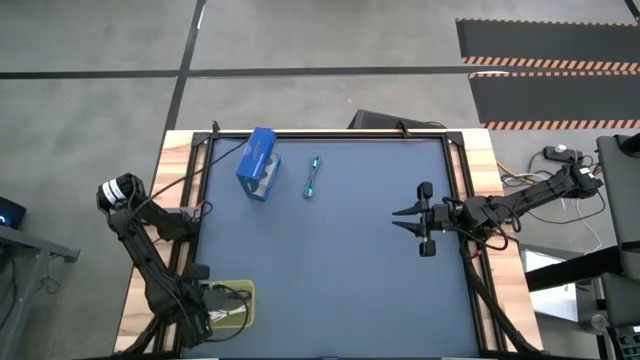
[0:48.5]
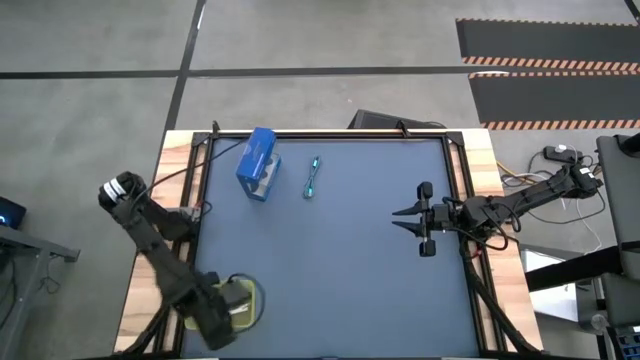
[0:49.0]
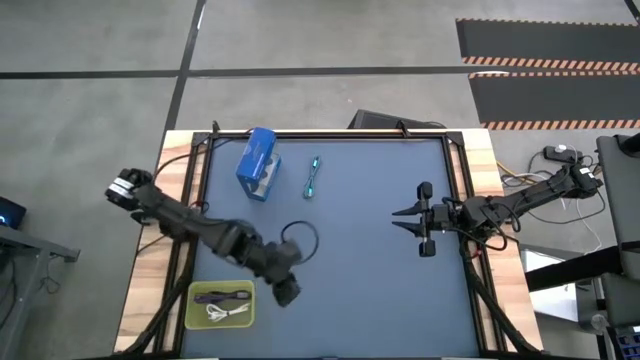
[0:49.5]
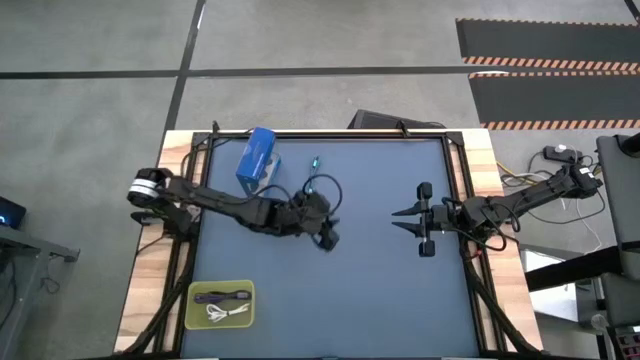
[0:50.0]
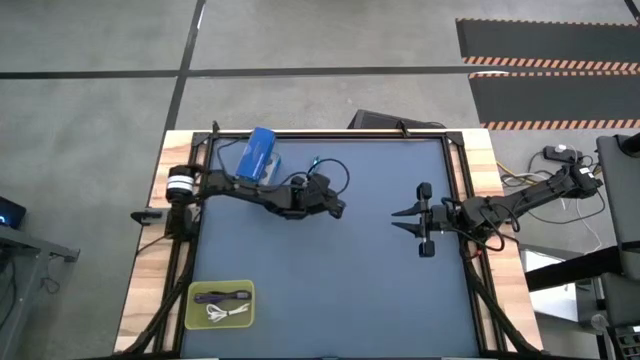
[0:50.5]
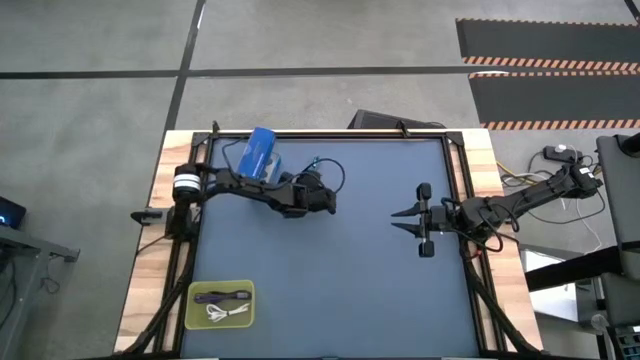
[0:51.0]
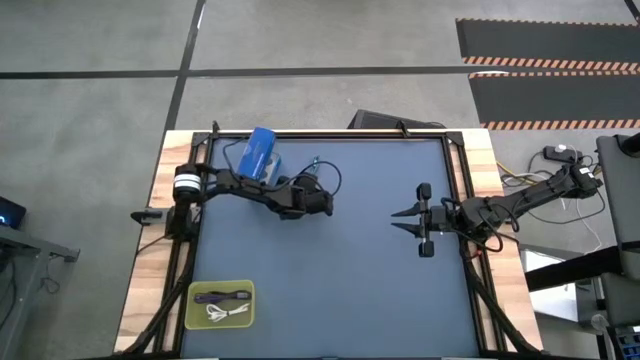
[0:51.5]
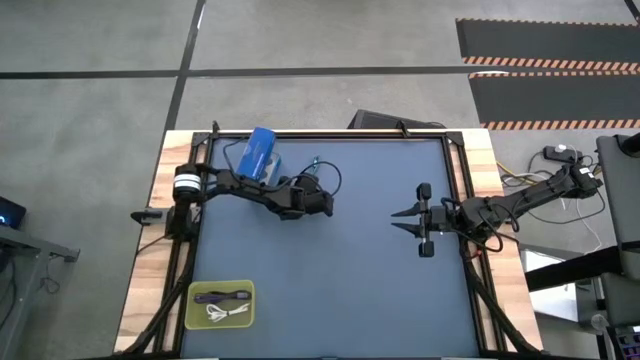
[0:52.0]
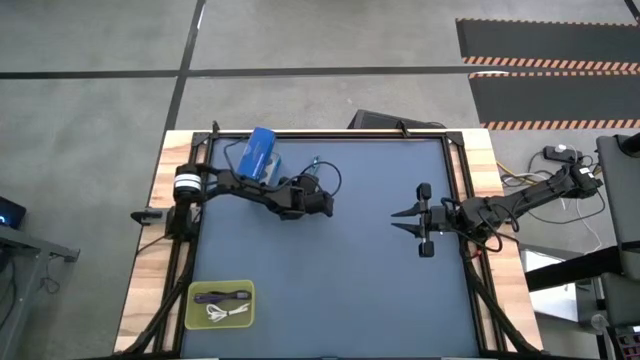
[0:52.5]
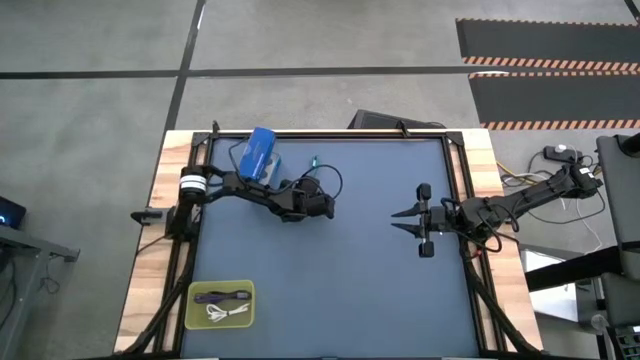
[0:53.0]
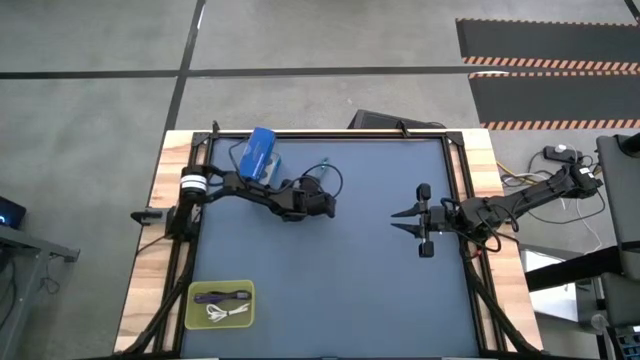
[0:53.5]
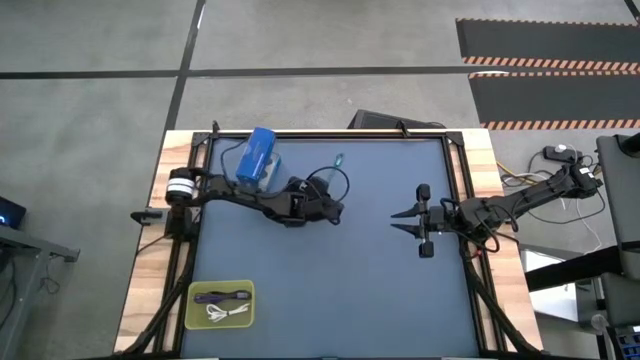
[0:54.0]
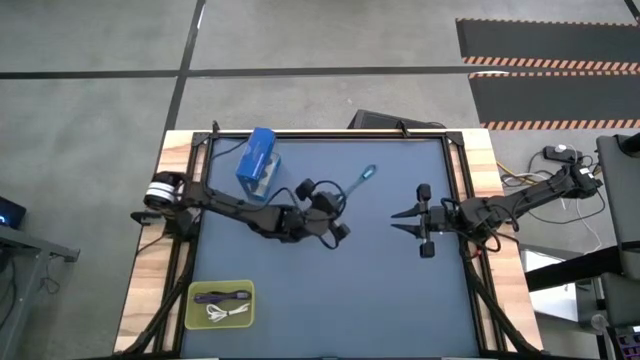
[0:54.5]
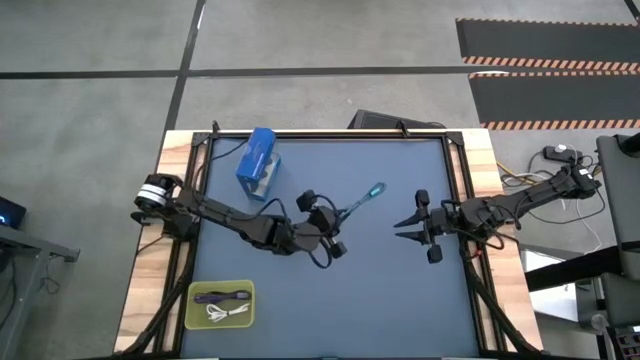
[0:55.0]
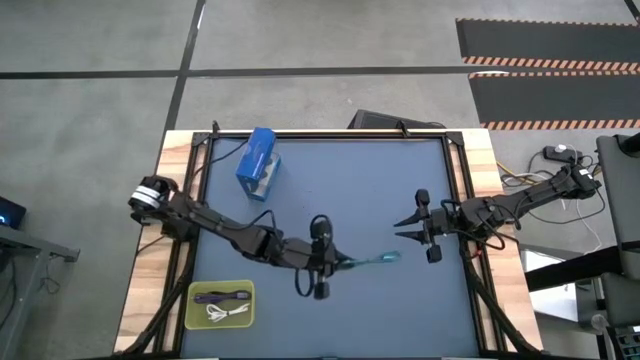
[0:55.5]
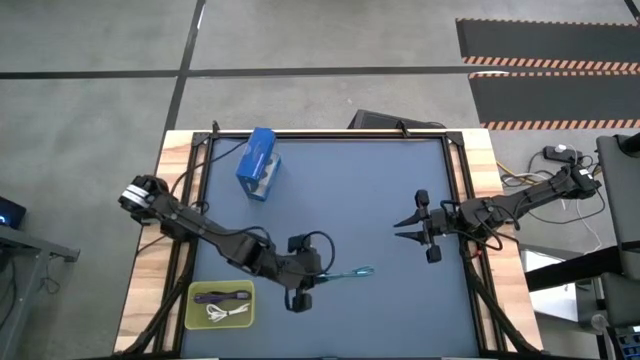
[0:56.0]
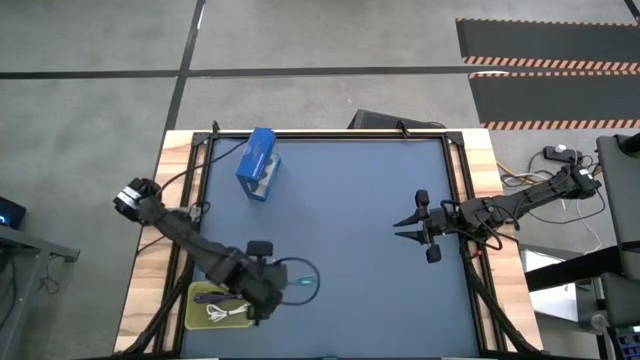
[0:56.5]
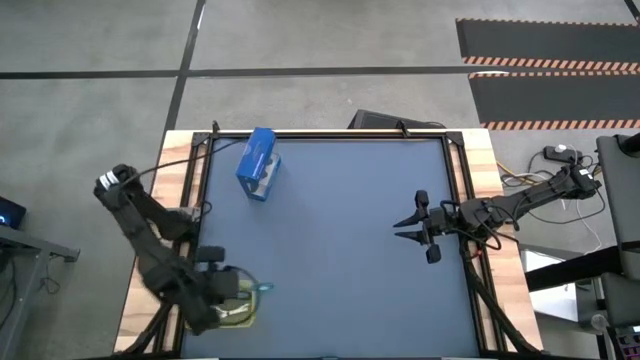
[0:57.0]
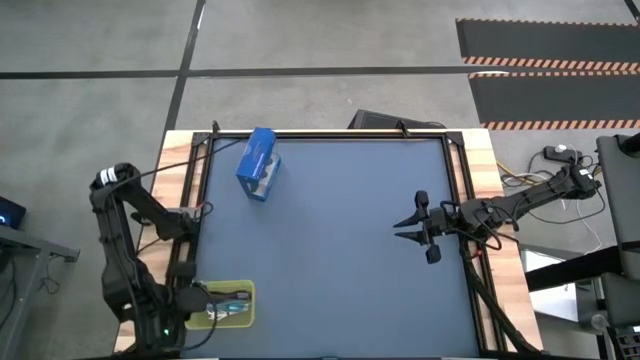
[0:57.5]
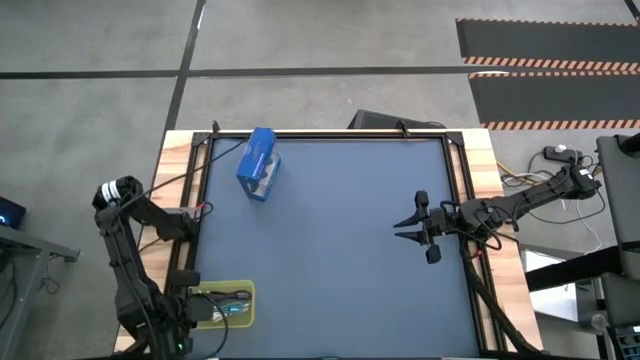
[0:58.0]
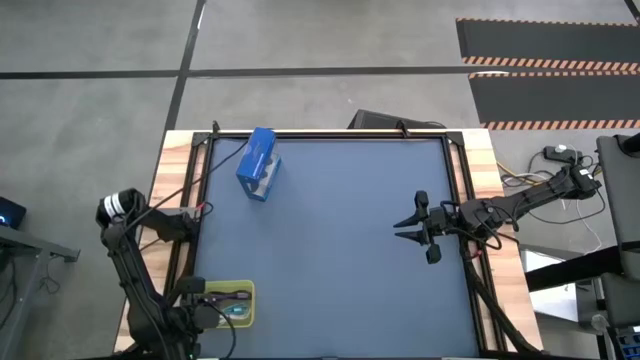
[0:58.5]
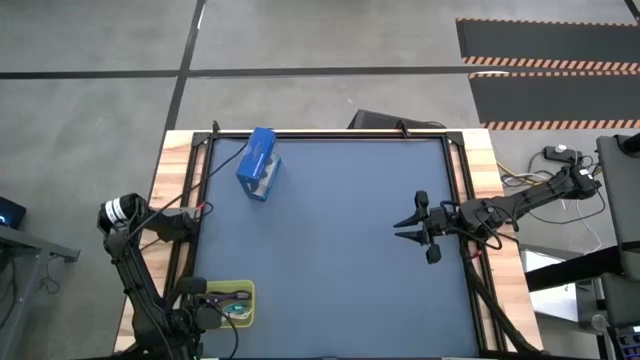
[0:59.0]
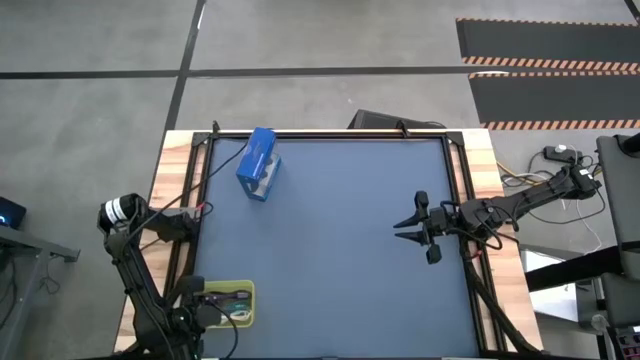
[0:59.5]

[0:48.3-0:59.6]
Task: Pick and place USB-C Cables
Put the green white charger cable into the yellow bin

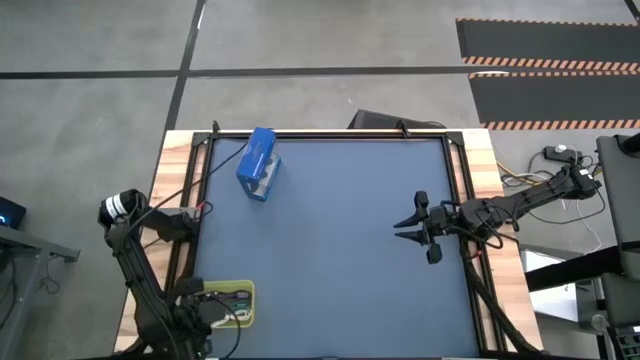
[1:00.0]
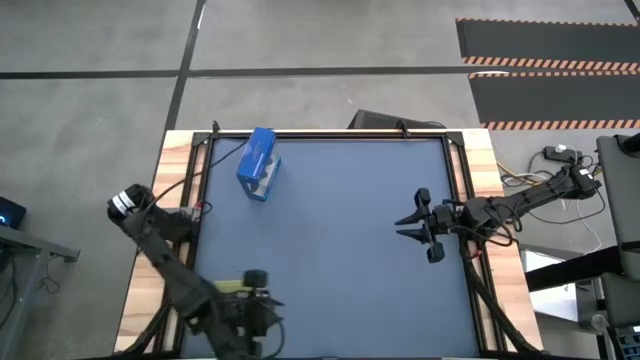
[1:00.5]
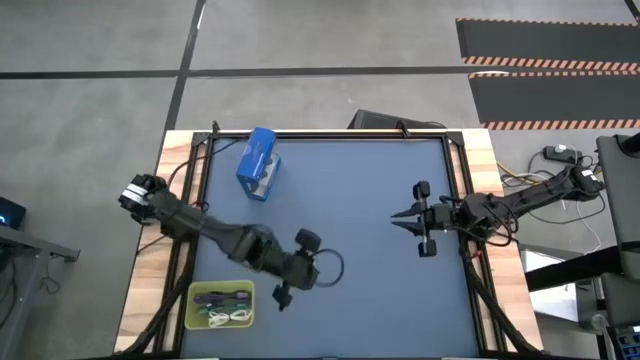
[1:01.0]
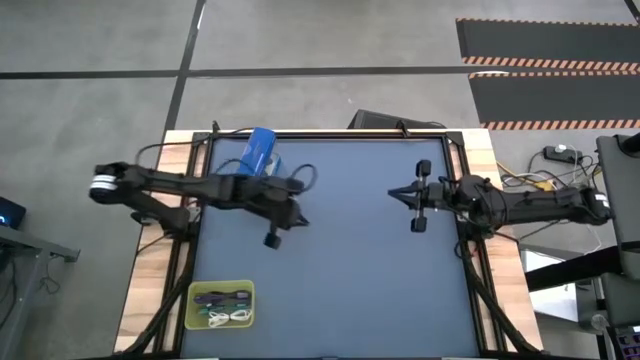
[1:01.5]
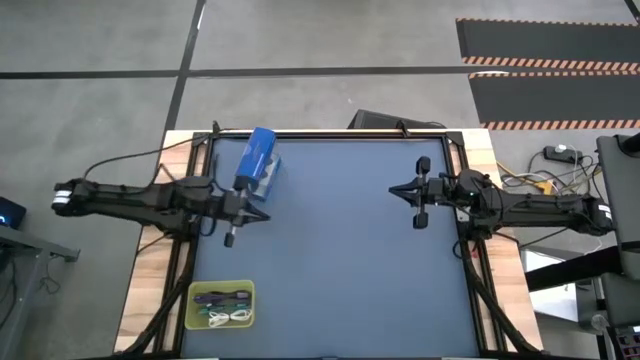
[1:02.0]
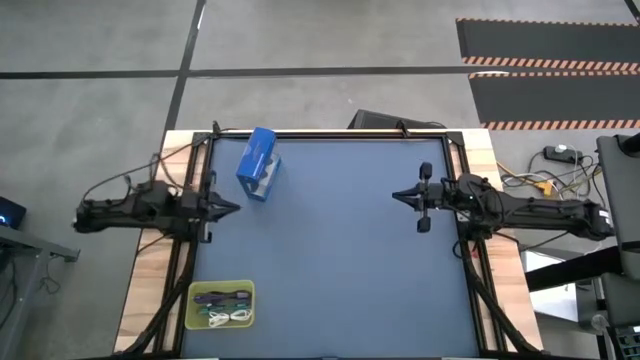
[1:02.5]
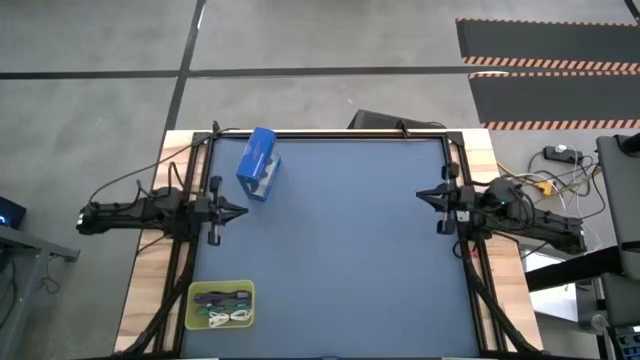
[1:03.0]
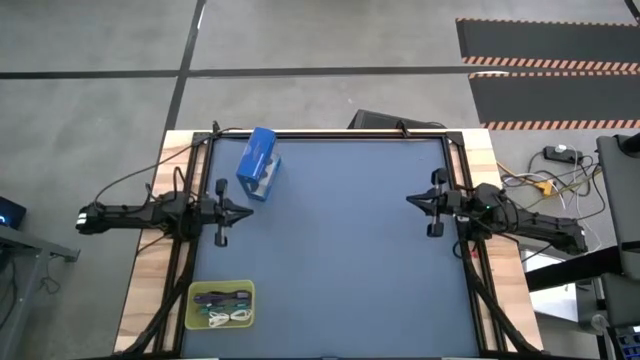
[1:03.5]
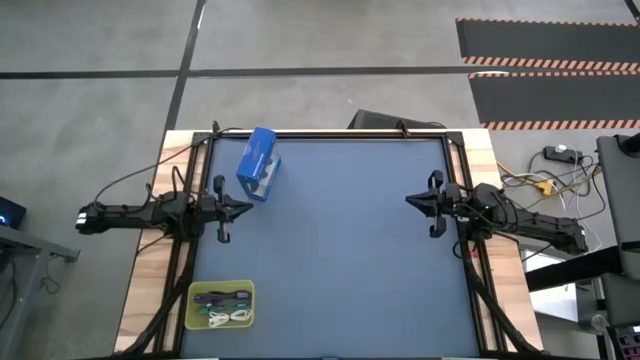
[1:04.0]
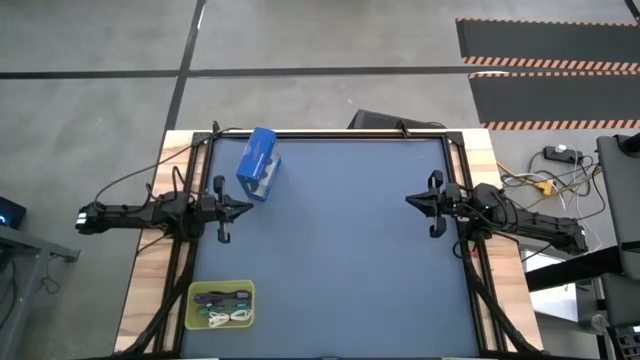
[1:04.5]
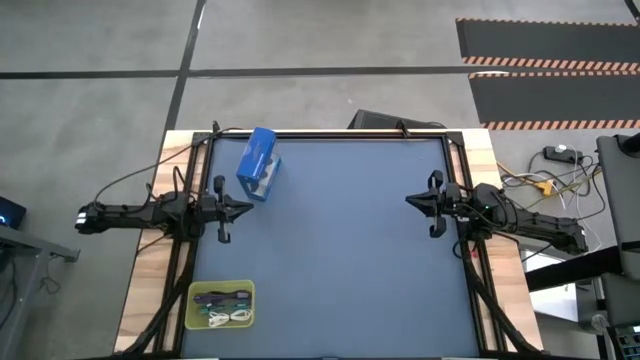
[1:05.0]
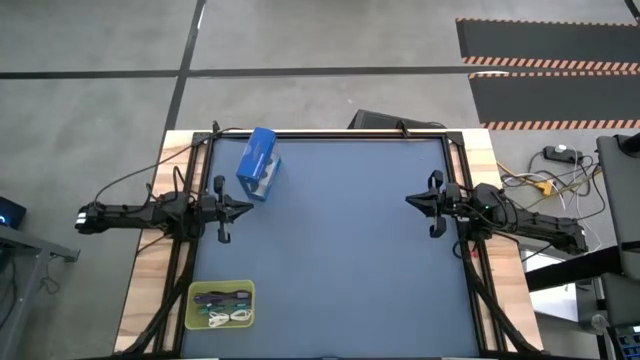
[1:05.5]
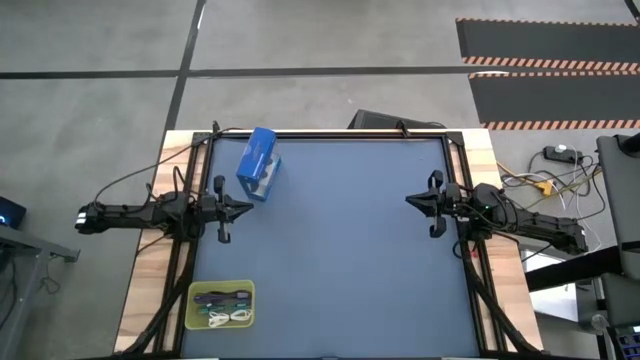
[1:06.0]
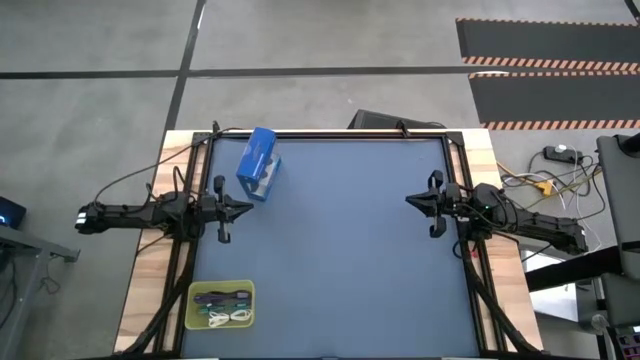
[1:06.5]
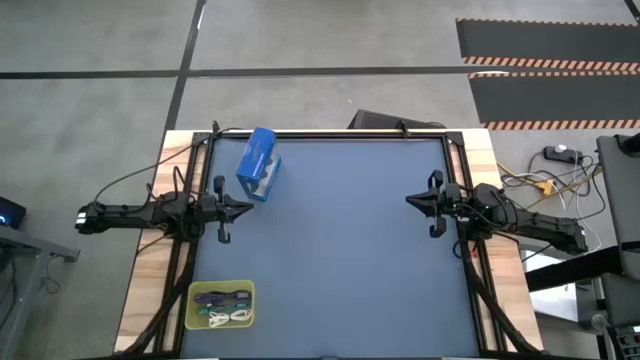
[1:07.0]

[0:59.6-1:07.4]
Return to Home Position

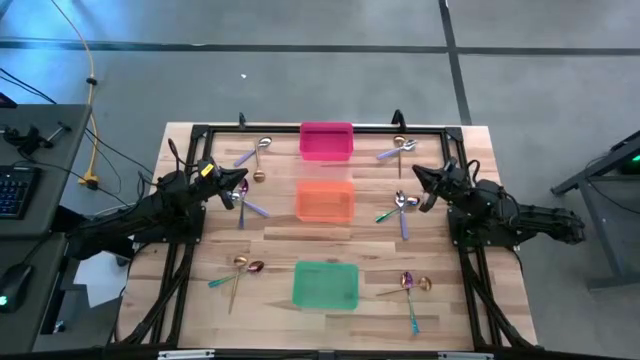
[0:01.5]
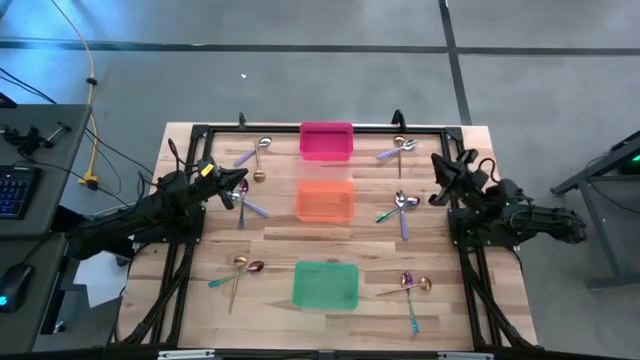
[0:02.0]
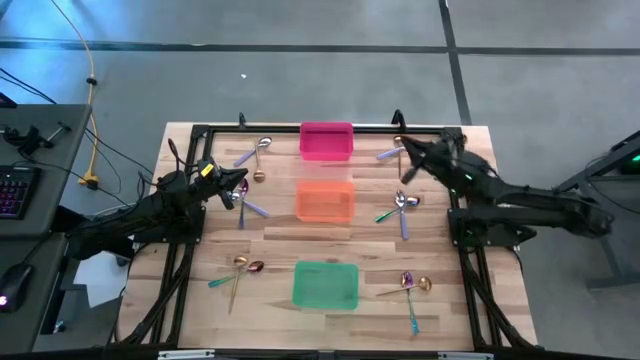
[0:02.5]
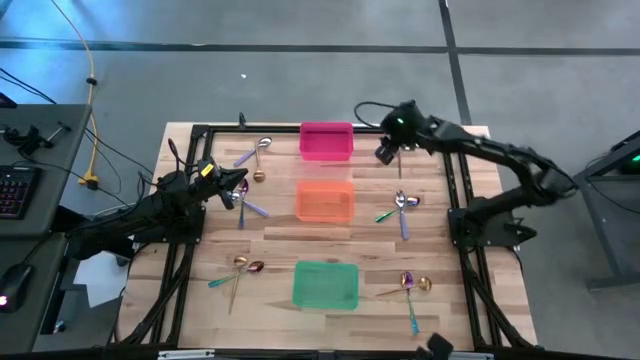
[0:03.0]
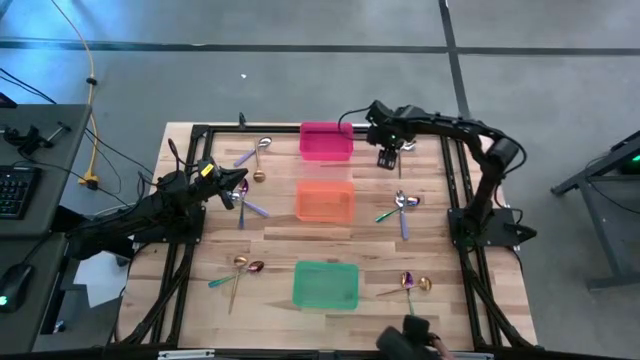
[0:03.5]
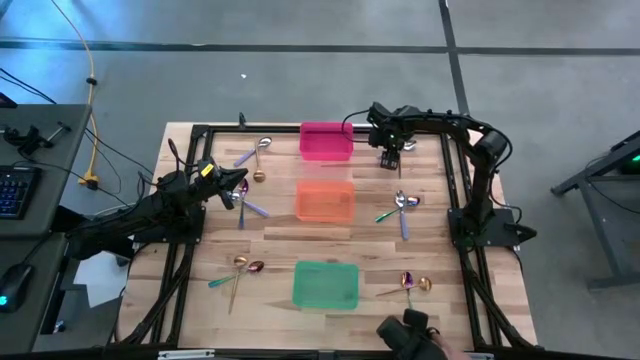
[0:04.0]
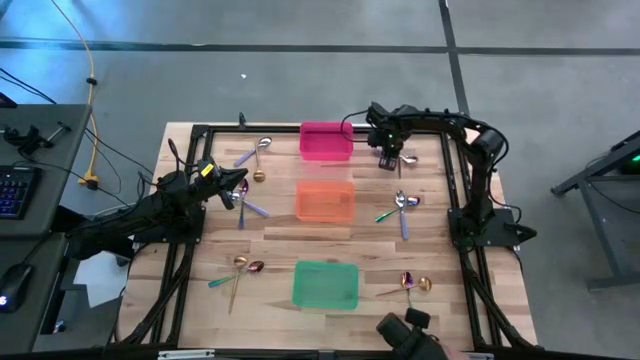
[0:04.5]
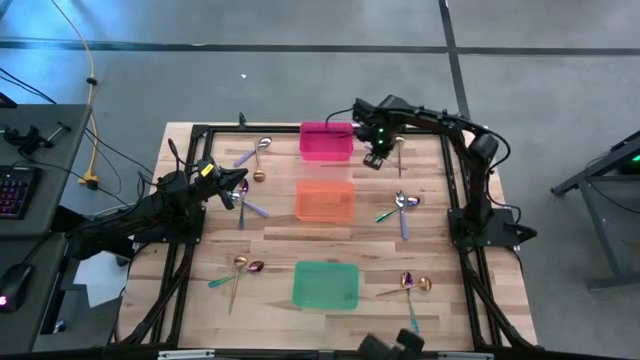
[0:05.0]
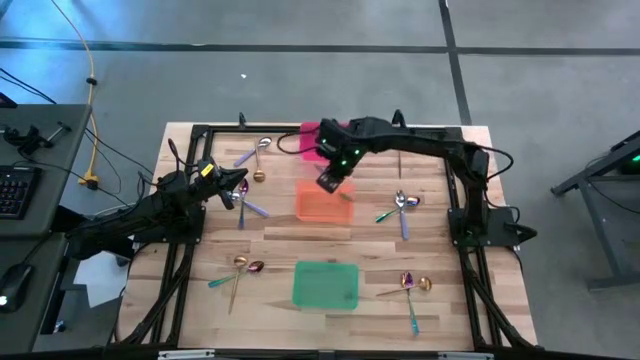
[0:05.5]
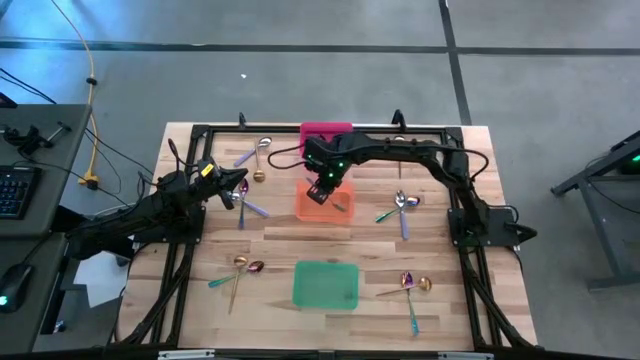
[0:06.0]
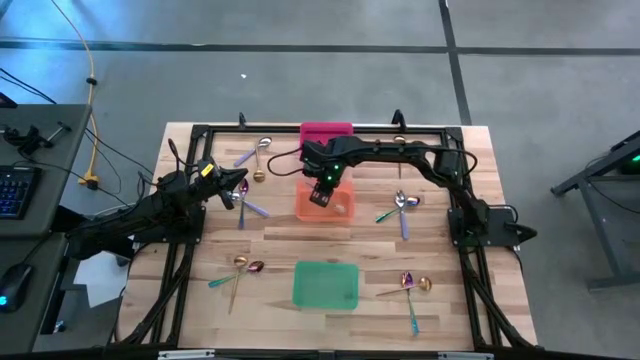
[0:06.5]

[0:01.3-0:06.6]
Task: Sort silverware by color (type)
Put the purple spoon into the orange bin
